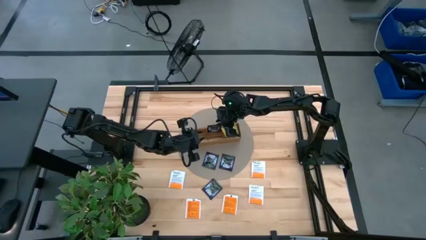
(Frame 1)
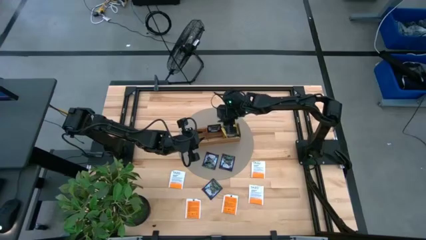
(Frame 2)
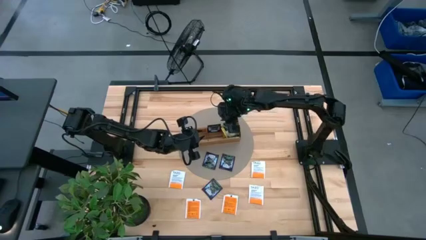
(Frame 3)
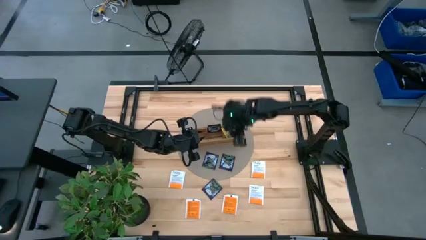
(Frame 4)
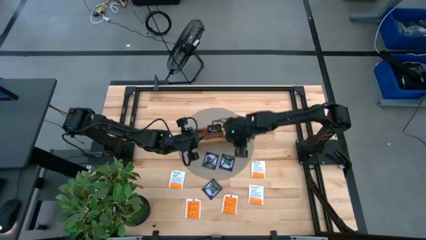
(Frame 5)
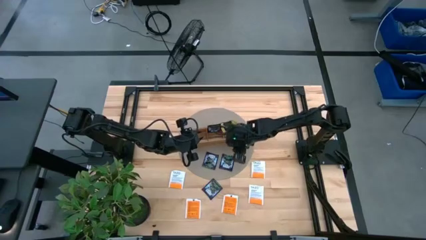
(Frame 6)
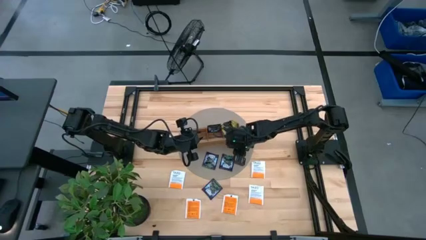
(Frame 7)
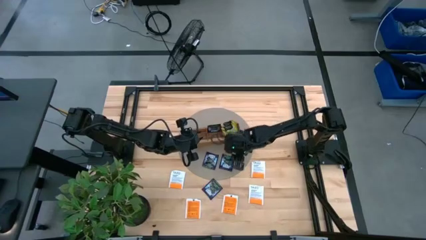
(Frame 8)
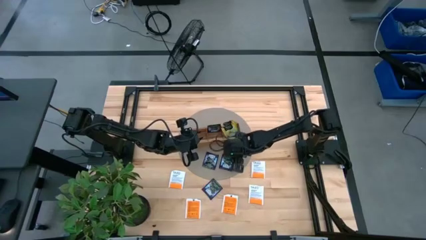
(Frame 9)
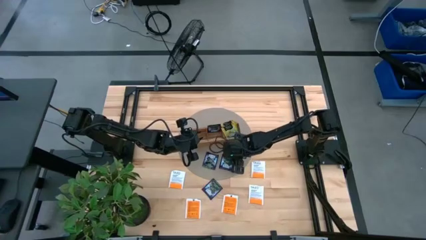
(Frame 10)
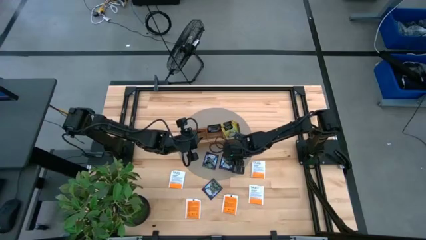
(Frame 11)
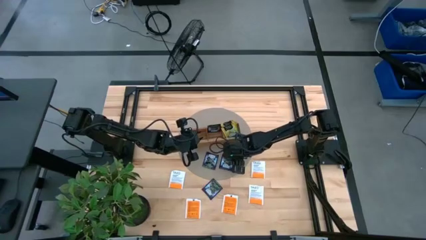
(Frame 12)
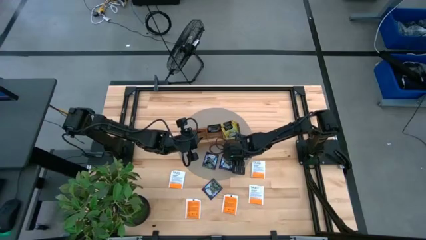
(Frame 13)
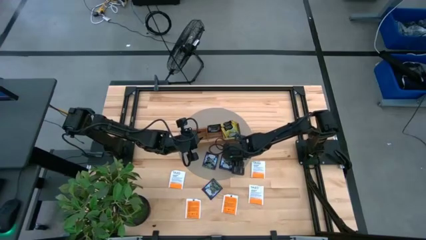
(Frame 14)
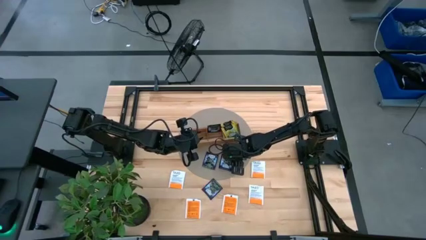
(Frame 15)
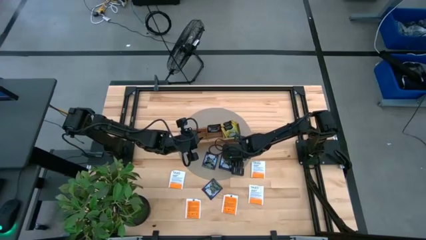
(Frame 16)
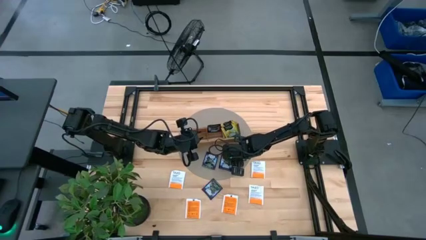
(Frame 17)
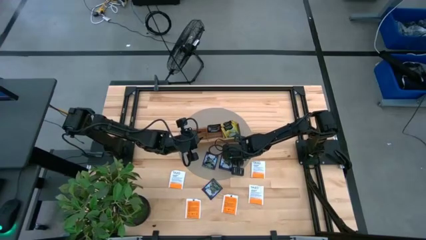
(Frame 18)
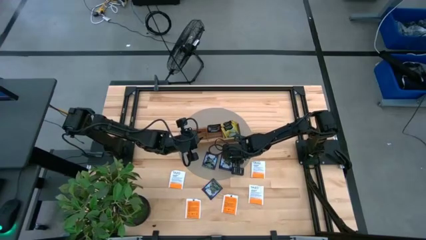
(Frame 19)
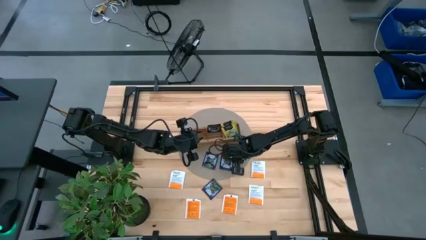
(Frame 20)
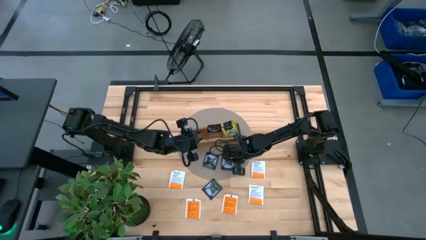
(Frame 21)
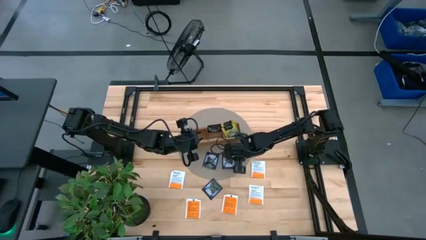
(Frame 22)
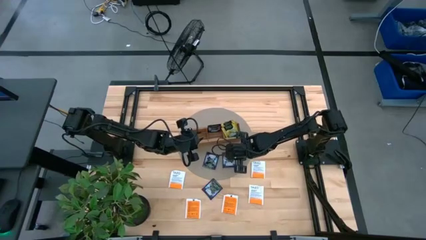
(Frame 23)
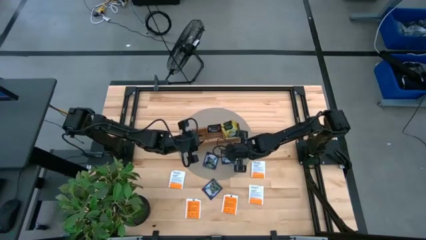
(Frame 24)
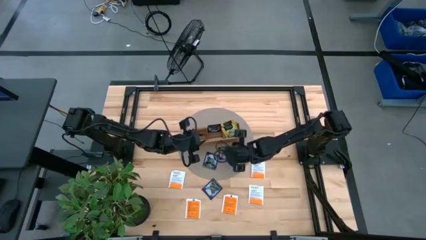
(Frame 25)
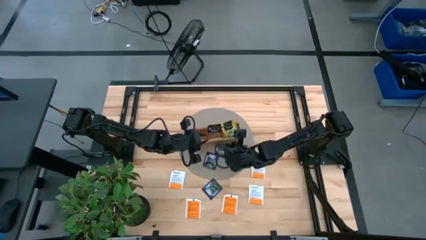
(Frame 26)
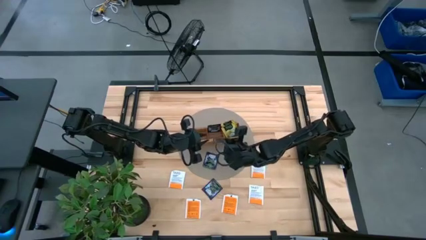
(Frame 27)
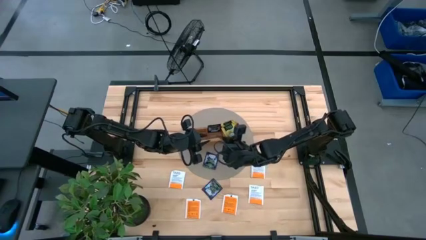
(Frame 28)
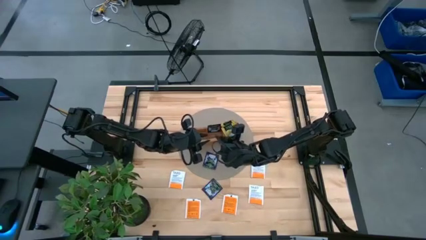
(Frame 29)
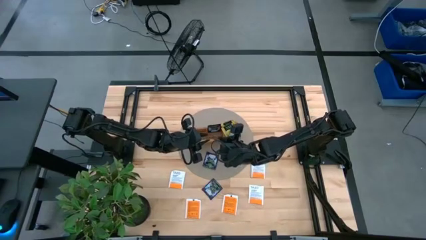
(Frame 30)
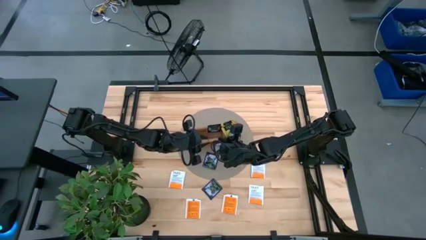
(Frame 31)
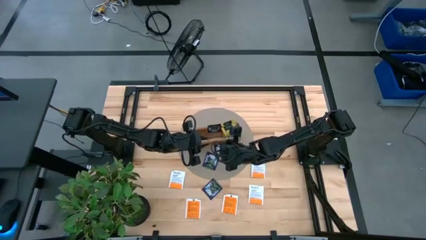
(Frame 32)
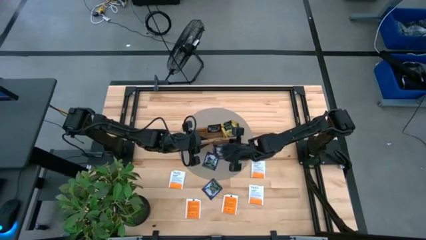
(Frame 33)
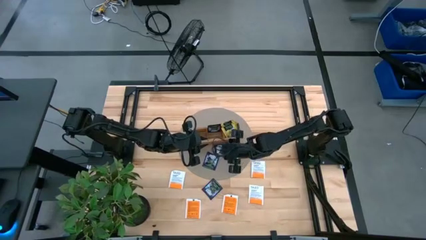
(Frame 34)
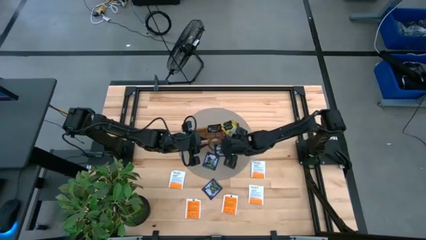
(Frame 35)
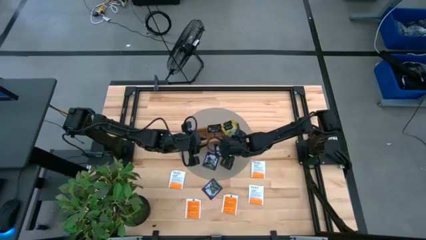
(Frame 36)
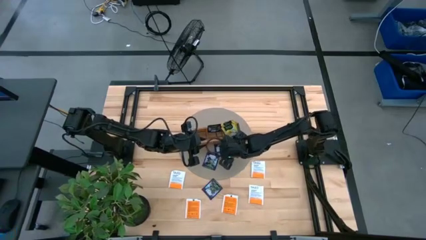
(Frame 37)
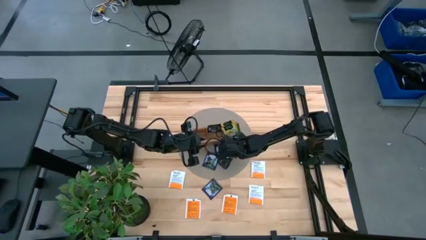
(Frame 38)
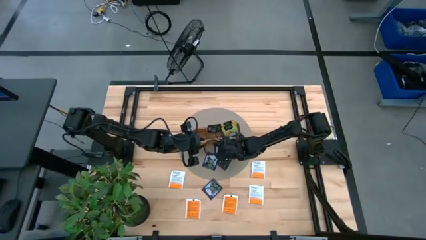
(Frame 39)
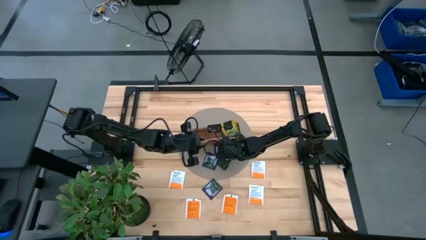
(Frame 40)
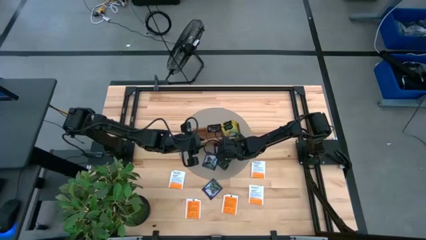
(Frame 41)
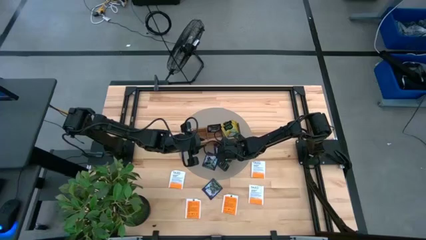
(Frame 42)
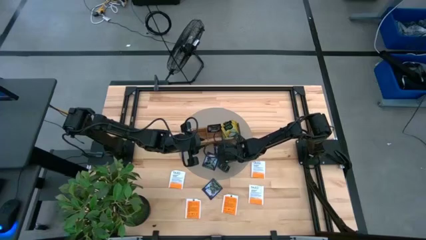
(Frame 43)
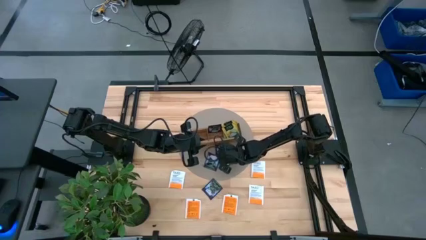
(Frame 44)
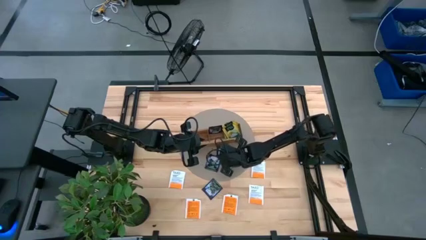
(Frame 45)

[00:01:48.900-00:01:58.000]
Task: Pick & Place Tea
Put the violet tea bag into the middle section of the wooden organizer

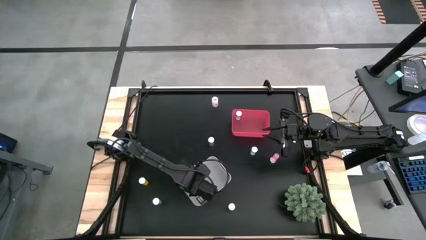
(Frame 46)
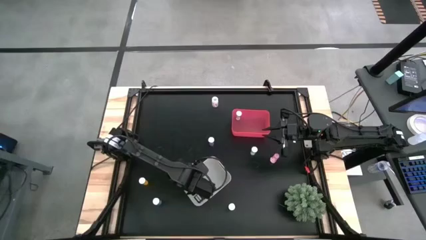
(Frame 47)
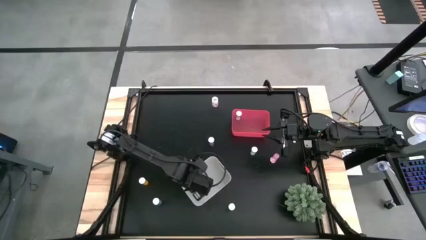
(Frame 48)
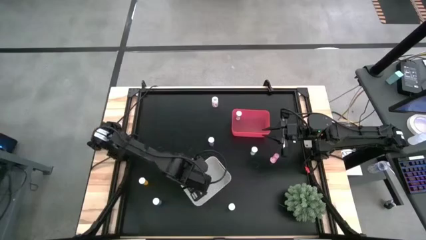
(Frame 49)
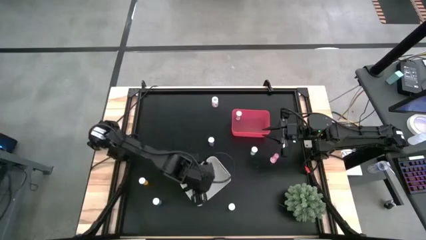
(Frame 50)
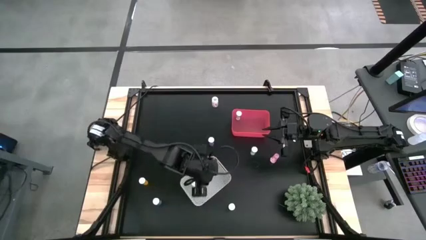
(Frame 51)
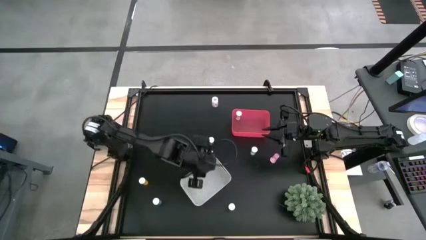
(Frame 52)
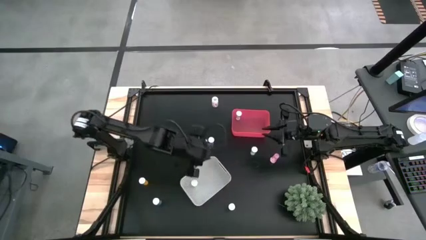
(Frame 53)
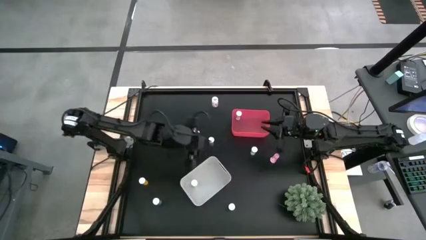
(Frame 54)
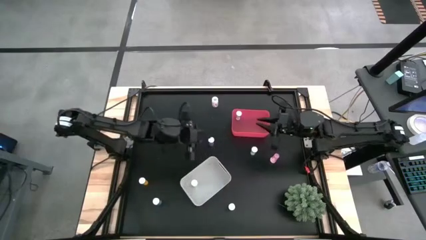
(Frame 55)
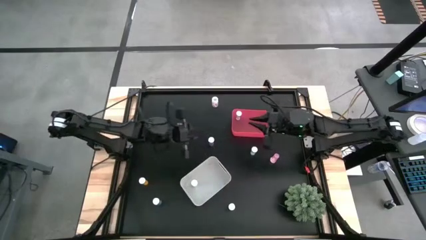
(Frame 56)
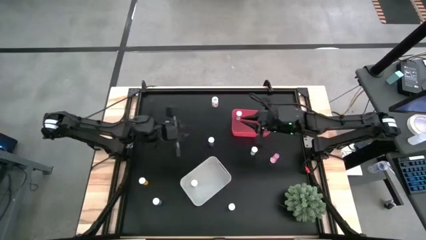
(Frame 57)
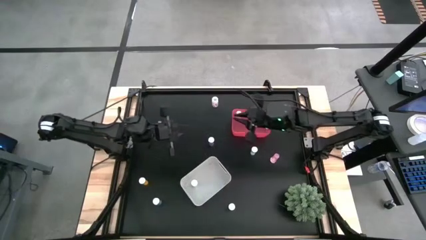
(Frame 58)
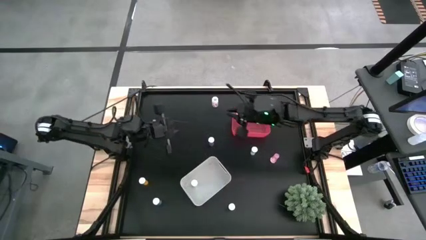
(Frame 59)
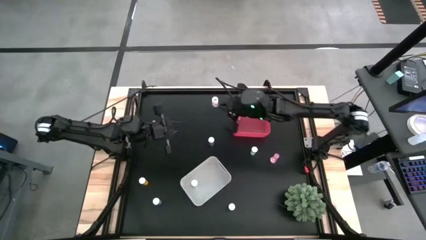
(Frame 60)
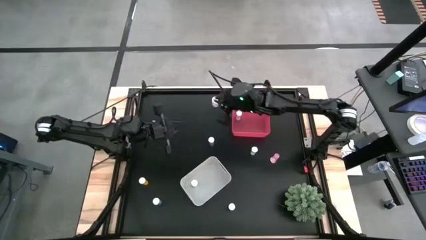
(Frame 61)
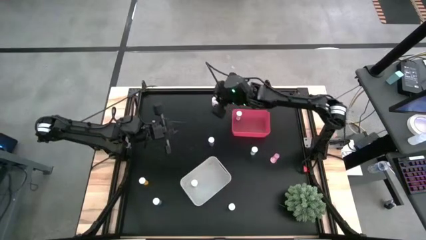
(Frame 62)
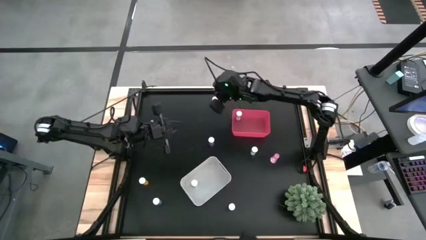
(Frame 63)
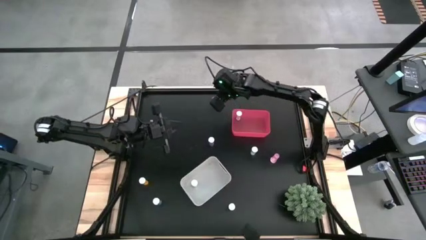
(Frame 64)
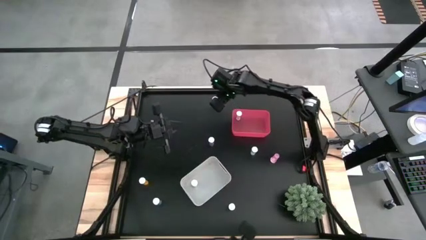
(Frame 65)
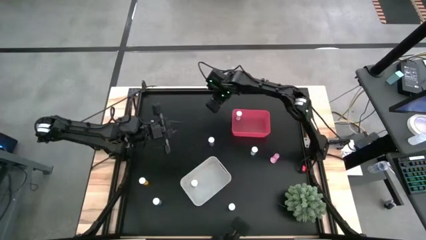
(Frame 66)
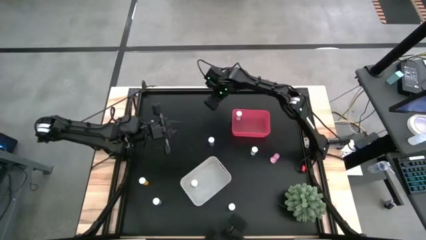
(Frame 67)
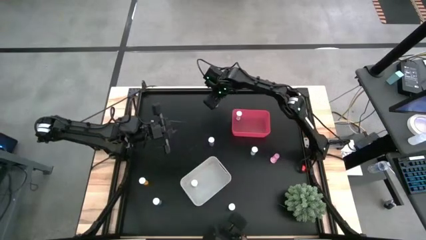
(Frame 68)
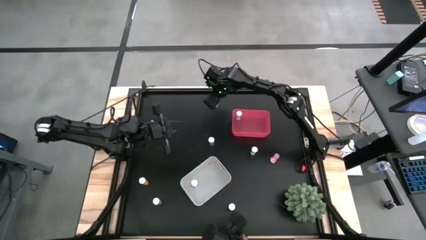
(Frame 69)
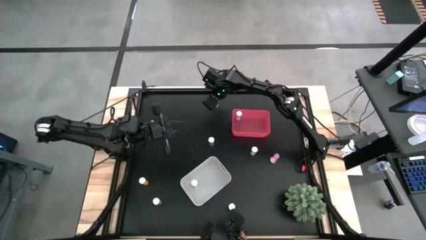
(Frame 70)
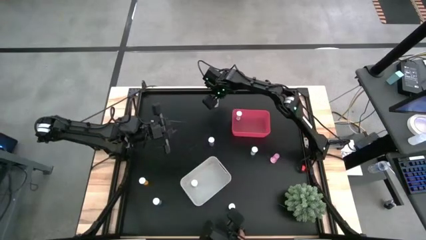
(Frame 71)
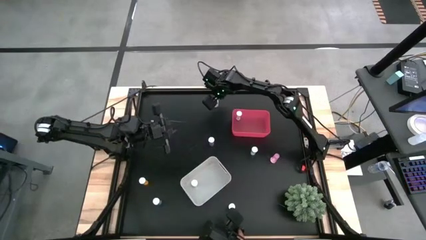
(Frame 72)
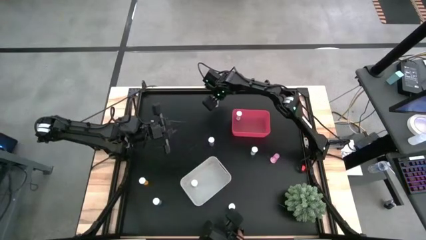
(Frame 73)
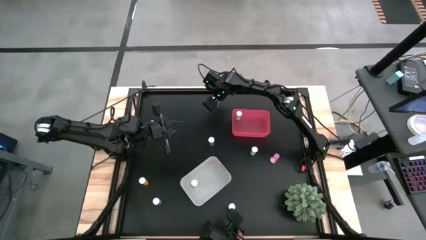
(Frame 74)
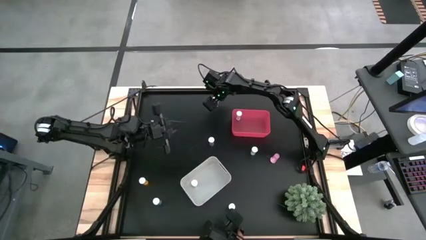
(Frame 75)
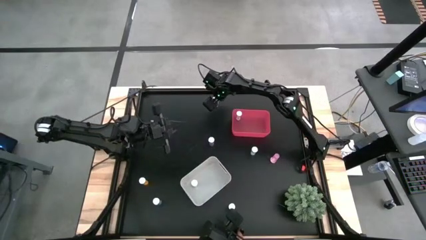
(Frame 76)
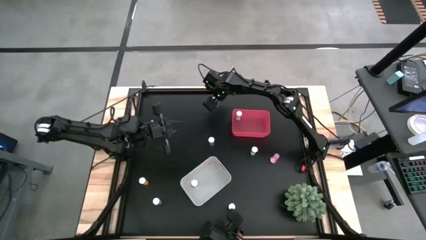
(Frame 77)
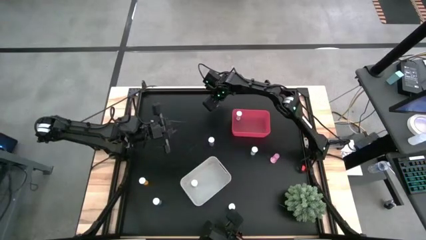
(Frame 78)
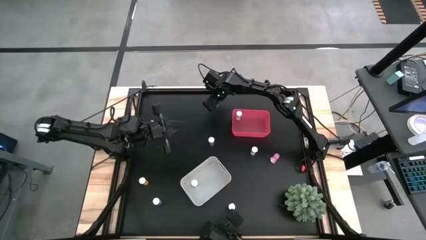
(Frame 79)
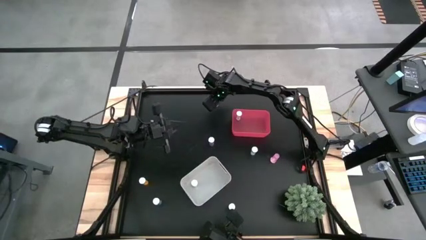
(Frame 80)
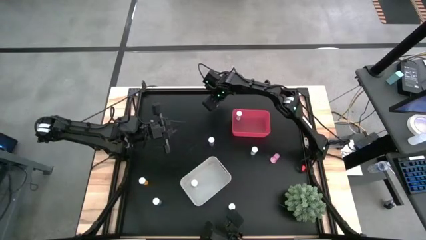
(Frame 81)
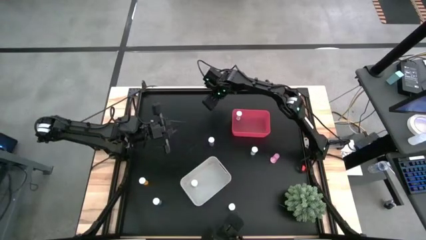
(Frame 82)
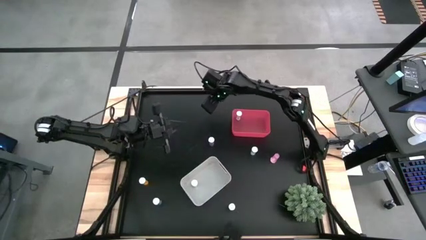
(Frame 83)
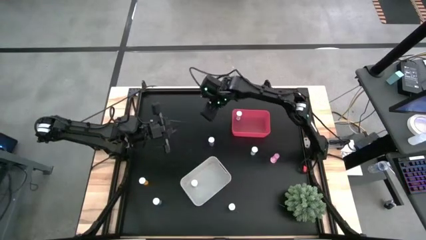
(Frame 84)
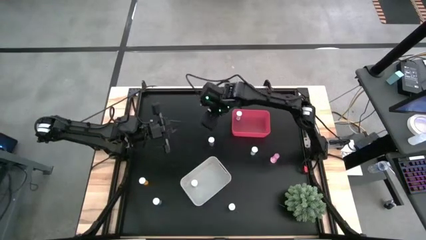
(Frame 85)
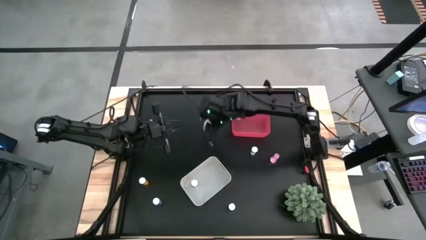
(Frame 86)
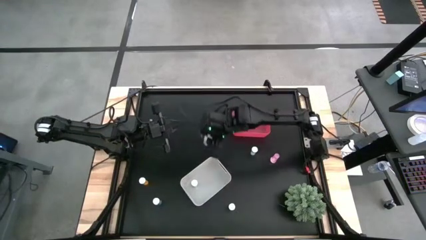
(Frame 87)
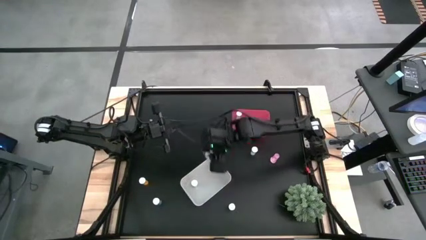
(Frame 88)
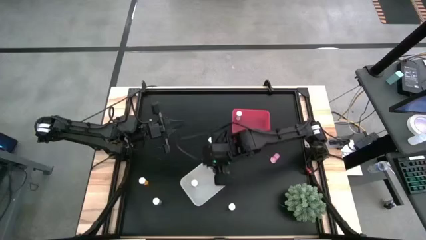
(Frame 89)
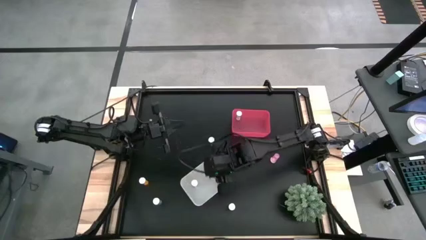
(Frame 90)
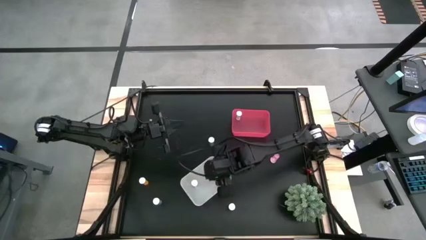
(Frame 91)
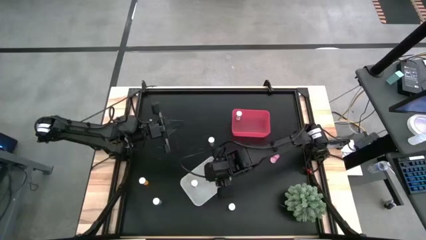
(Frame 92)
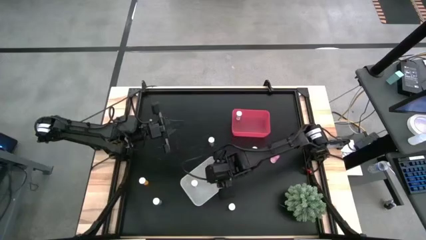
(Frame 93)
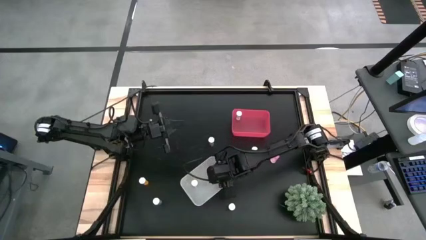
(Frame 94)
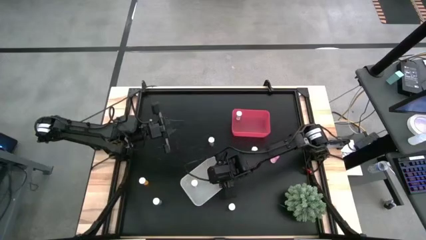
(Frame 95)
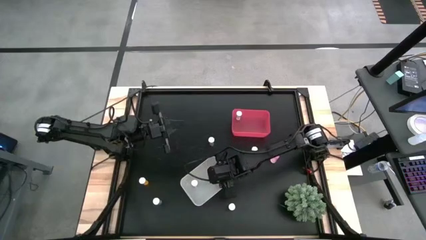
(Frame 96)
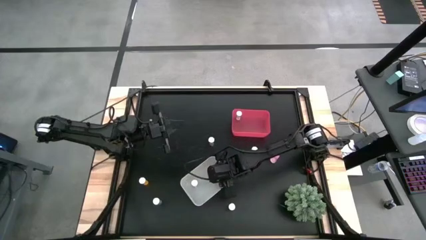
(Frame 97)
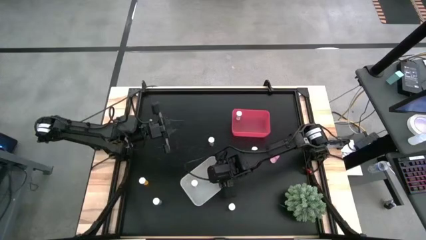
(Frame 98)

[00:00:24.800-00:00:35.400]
Task: Pick and place medicine bottles into bin by pill shape (circle, oval)
Put the transparent capsule bottle into the white bin
